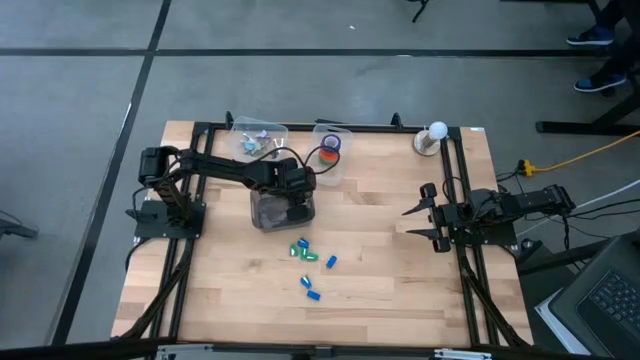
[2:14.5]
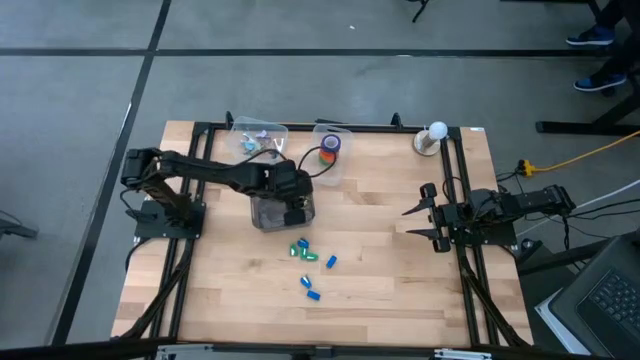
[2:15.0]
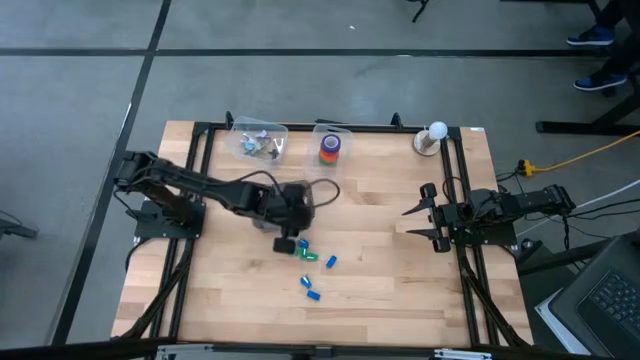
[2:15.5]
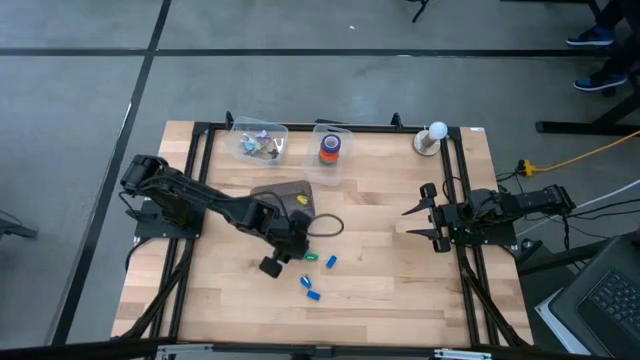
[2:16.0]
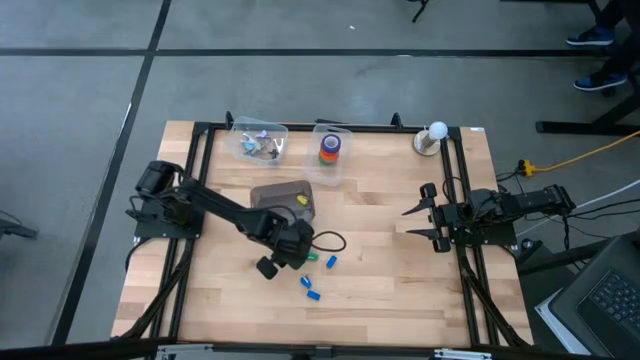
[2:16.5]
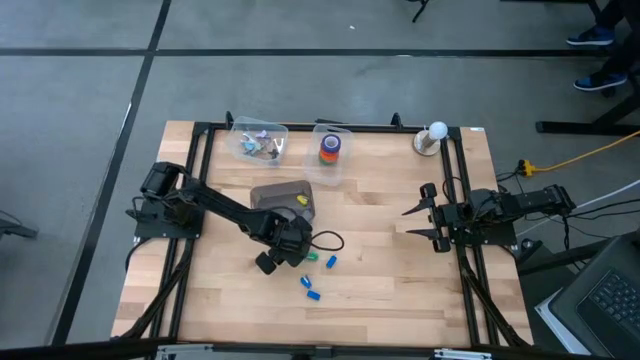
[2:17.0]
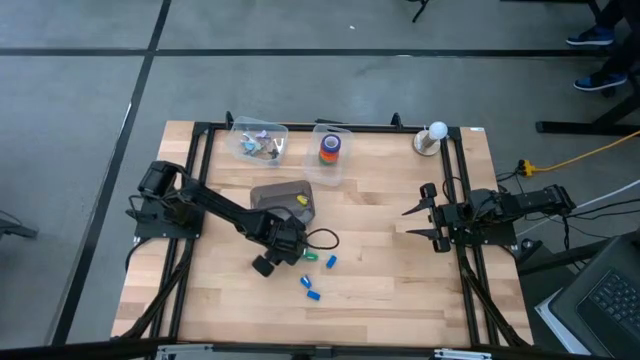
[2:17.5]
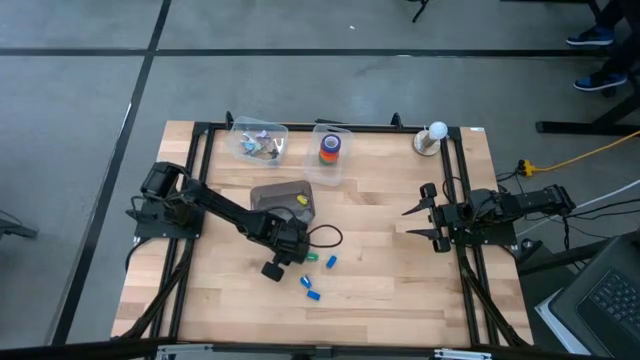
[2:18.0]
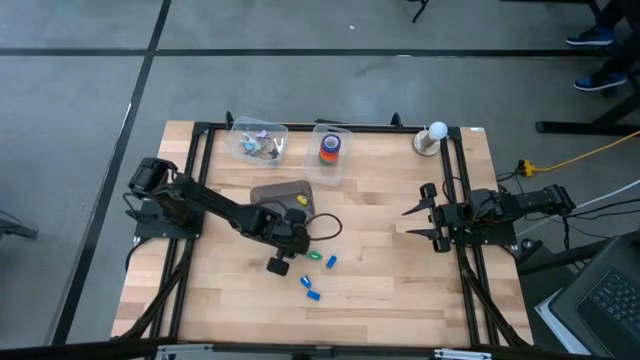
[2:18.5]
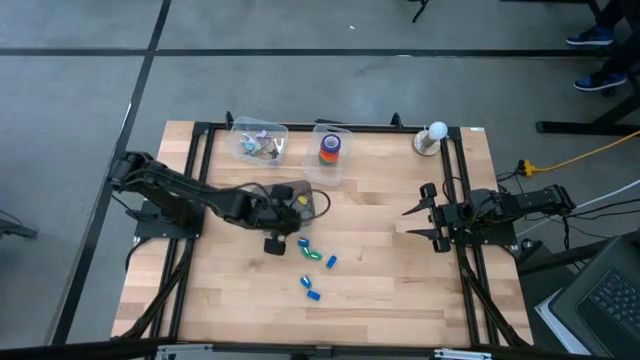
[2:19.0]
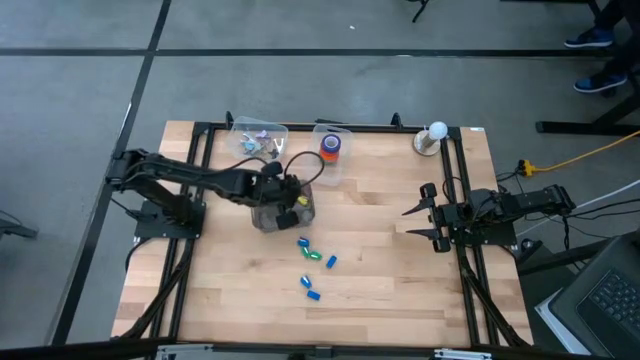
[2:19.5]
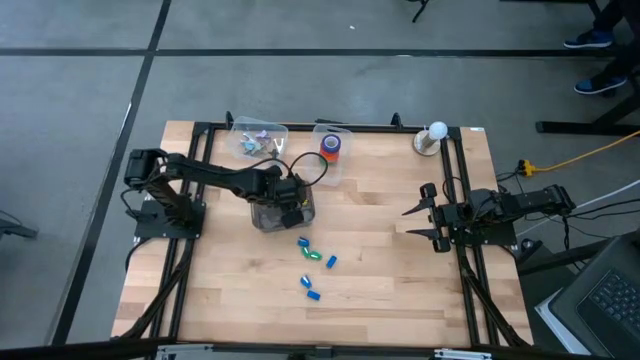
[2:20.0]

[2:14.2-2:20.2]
Task: Pick and place Stapler, Stapler remover, tape
Put the green stapler into the black bin

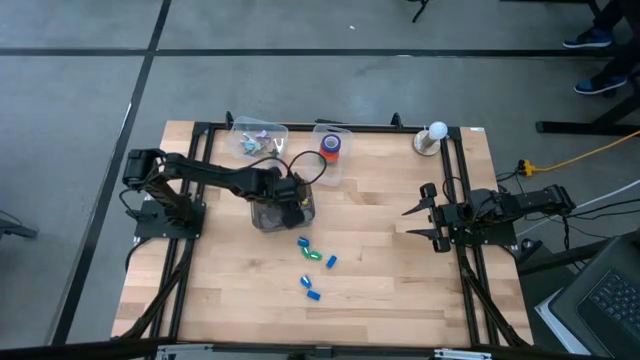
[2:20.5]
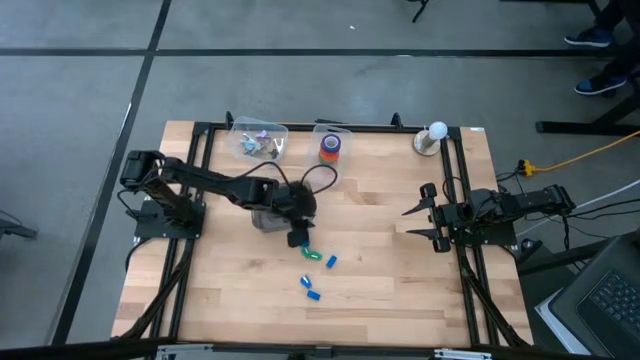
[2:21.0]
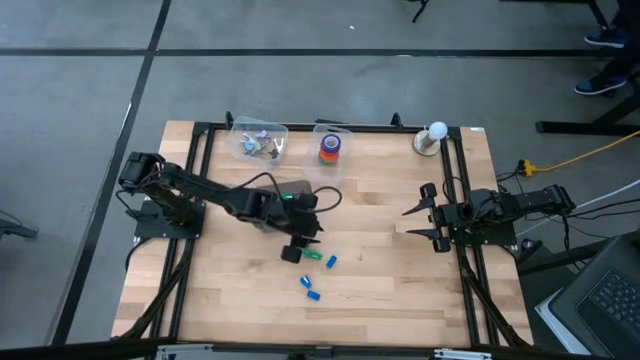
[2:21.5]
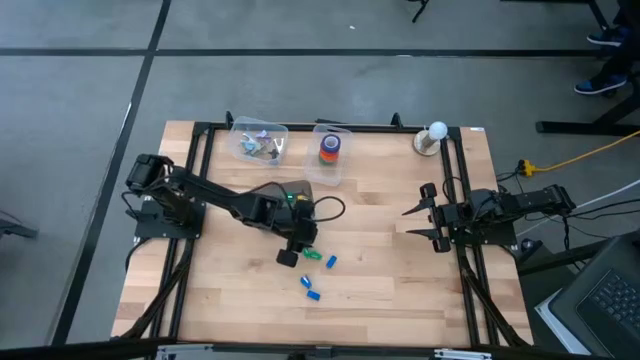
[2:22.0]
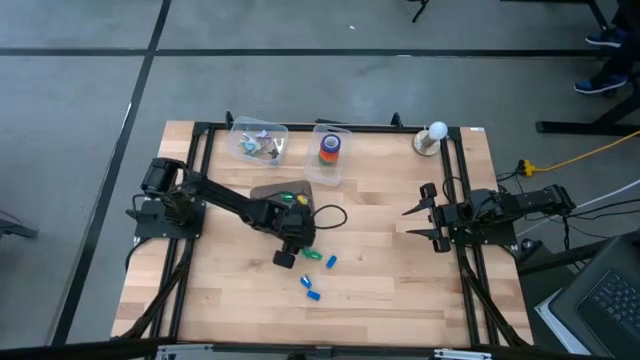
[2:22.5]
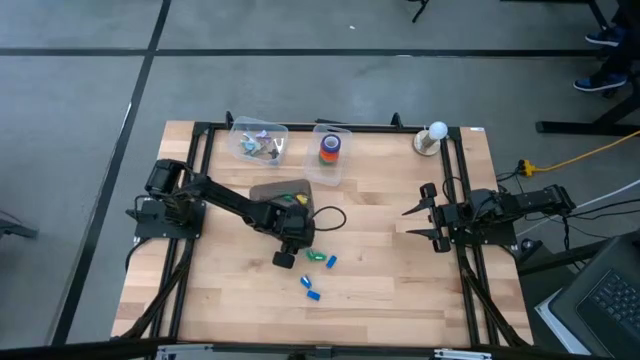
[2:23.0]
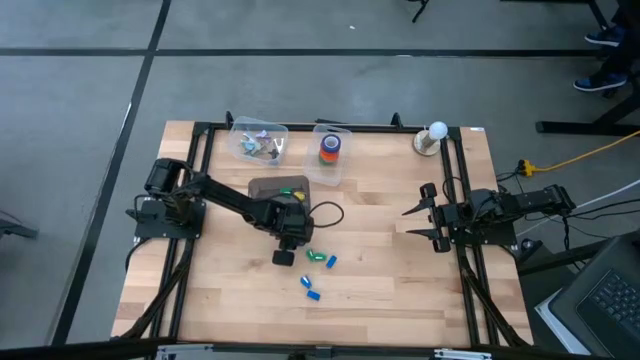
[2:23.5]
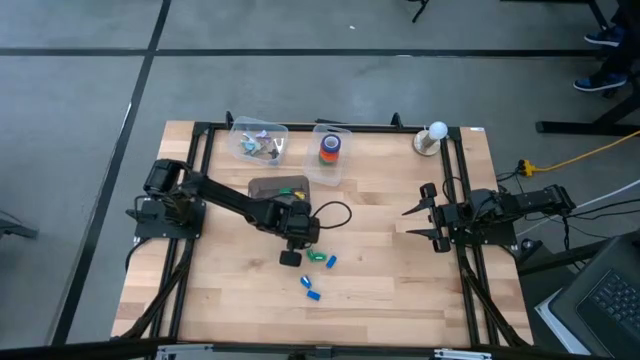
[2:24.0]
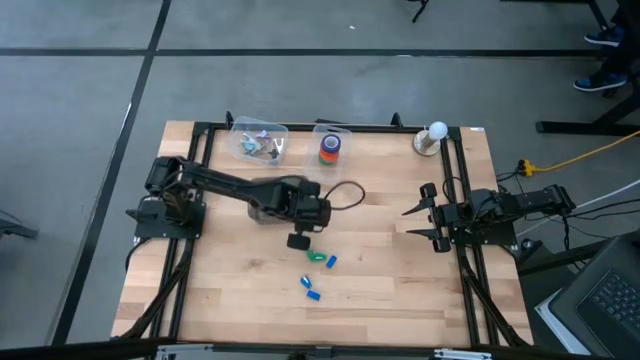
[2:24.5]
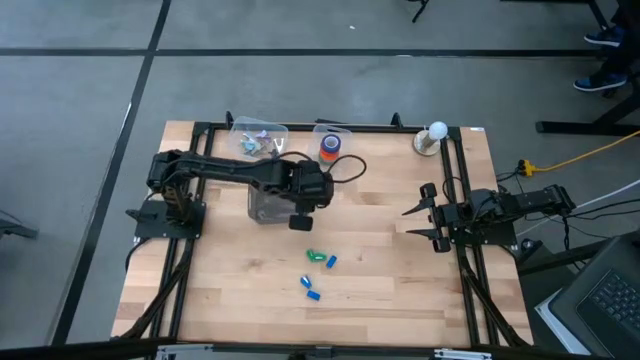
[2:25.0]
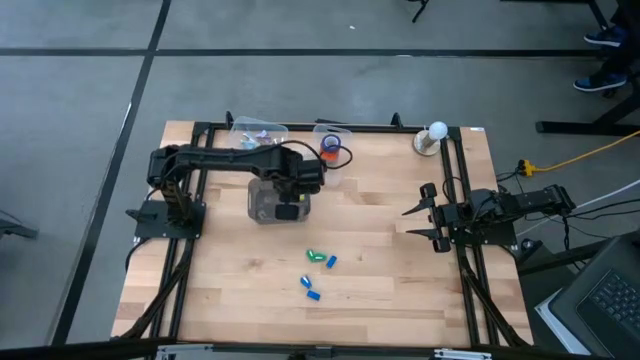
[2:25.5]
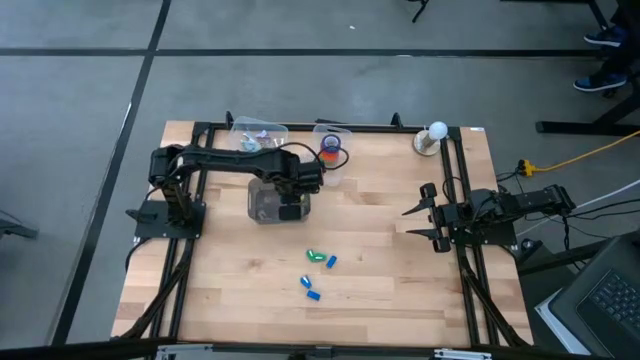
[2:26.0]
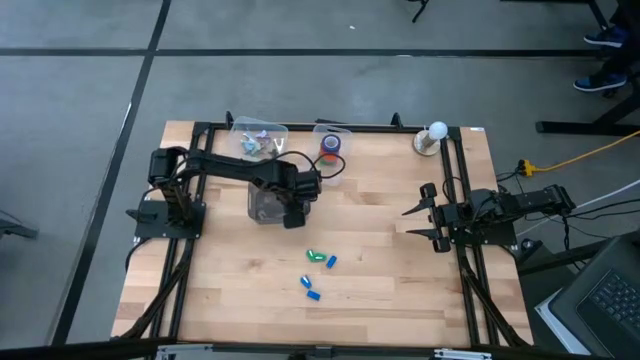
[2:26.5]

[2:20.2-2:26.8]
Put the blue stapler into the black bin

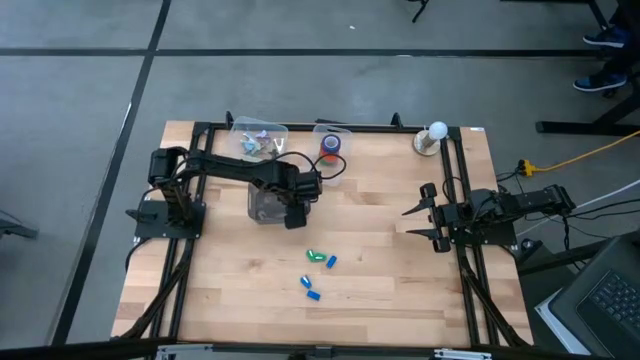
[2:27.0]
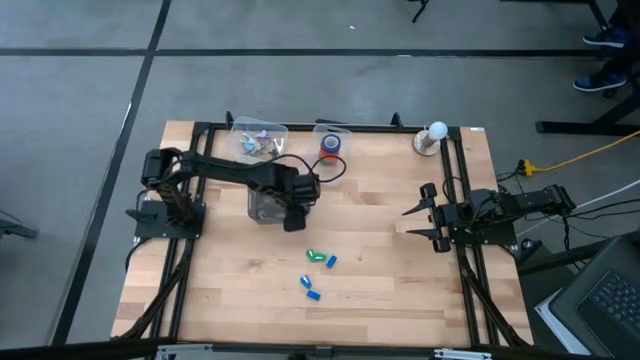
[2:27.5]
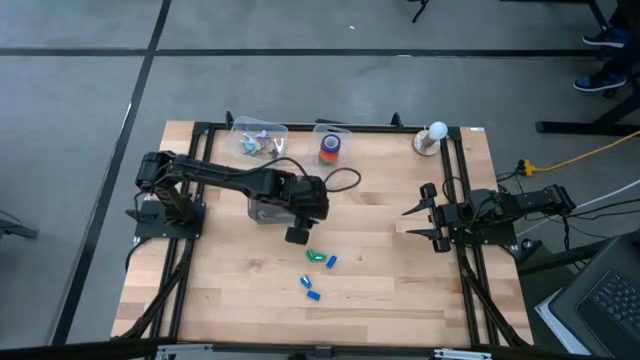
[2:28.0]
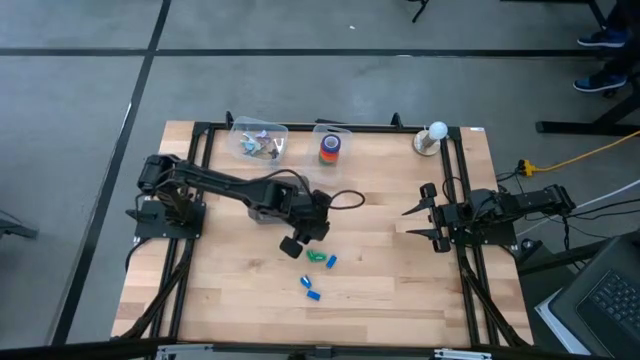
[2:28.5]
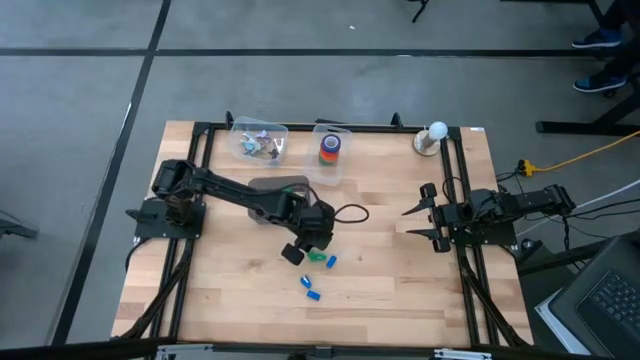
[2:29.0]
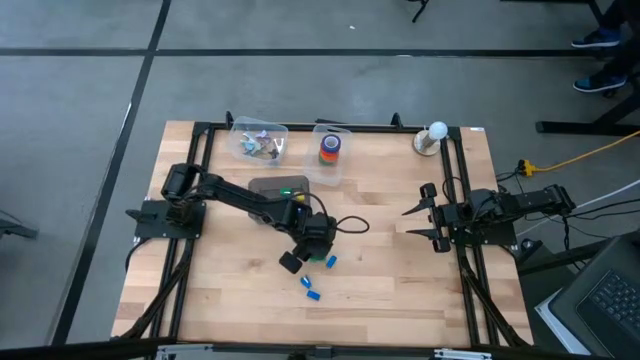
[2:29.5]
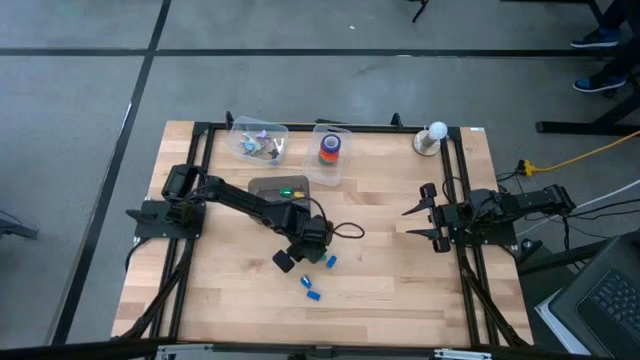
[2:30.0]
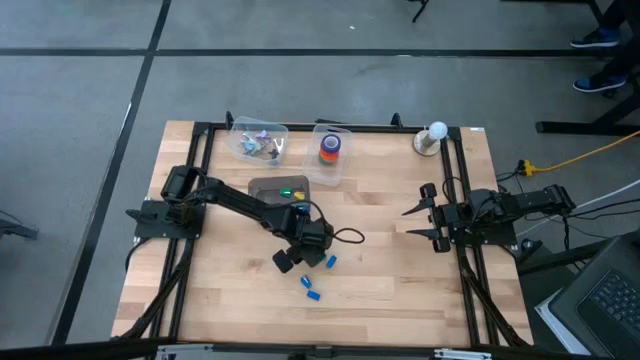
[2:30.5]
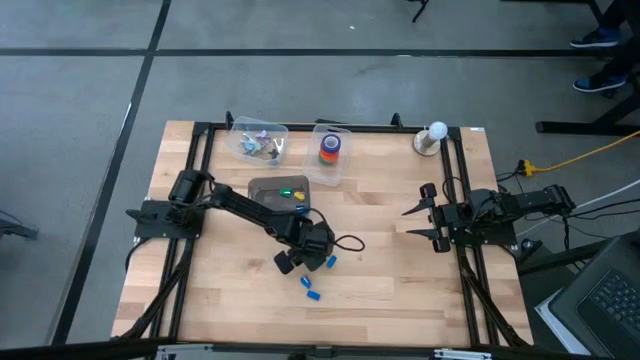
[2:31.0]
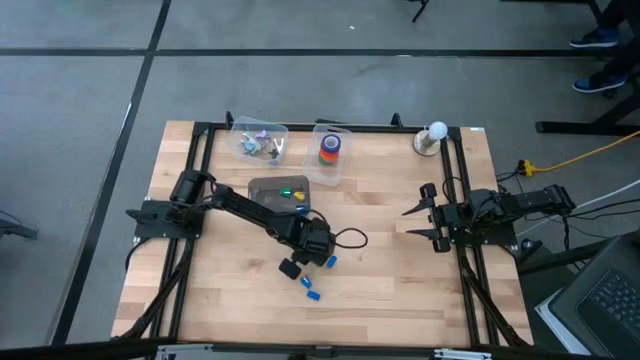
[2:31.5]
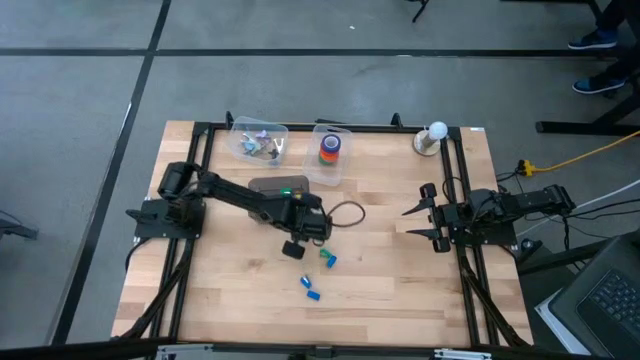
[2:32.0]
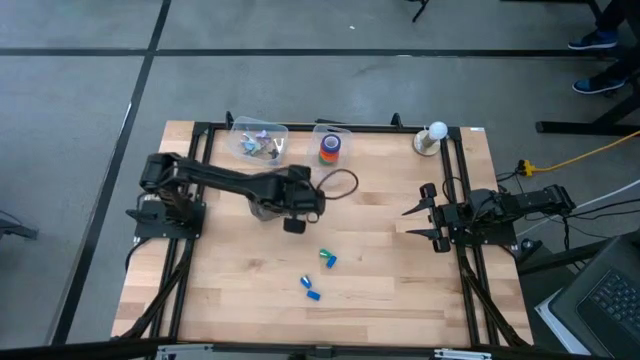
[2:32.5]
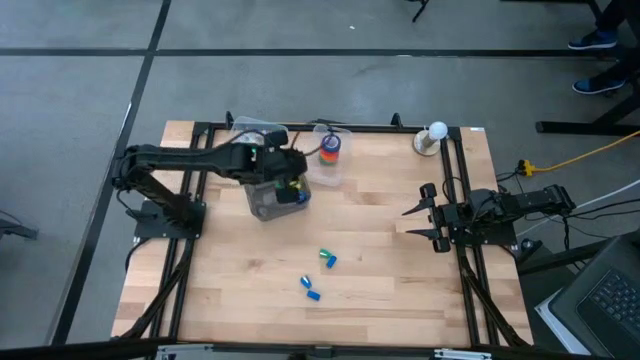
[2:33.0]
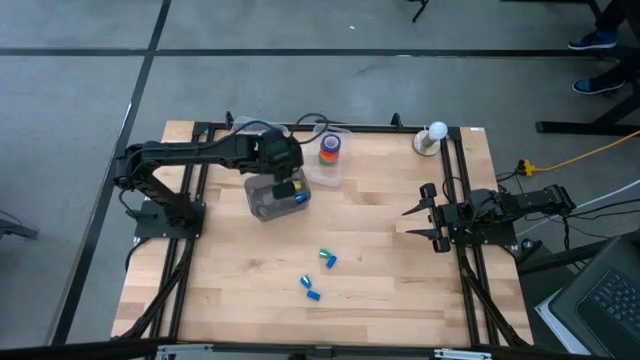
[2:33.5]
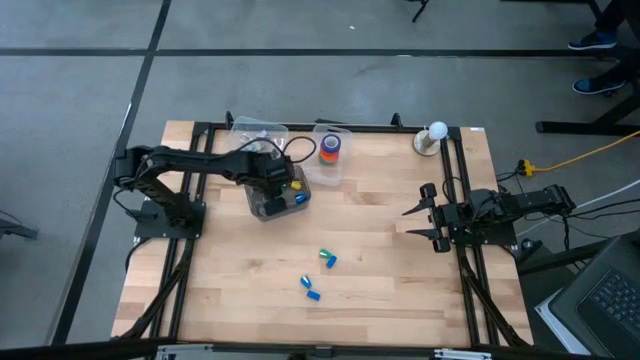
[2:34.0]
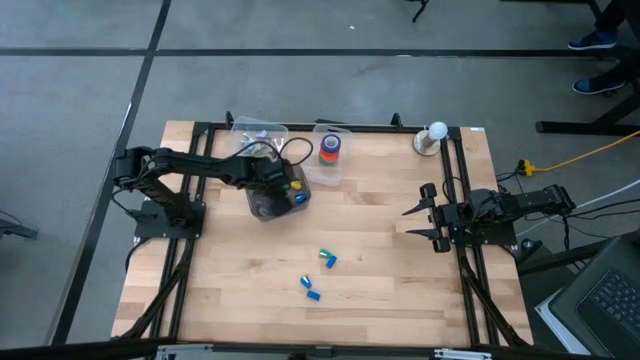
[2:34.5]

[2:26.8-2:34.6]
Put the green stapler into the black bin

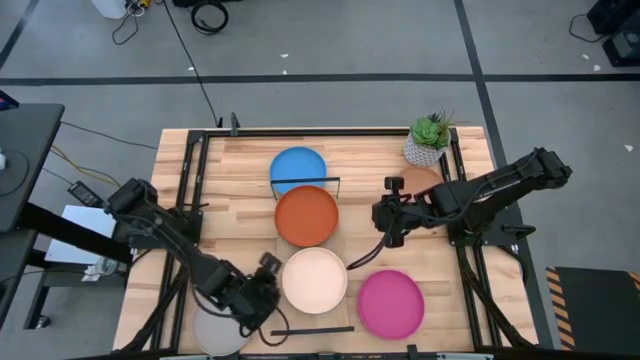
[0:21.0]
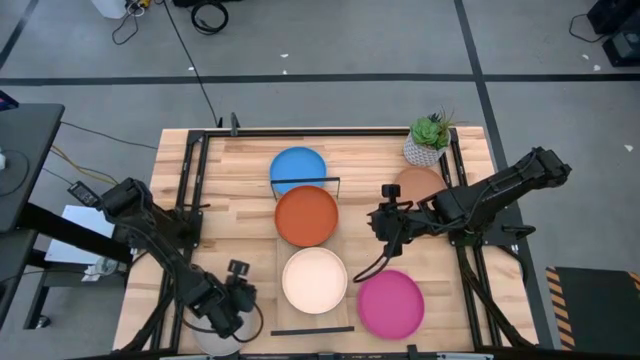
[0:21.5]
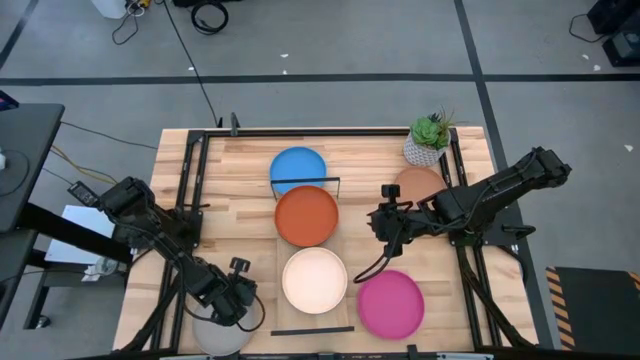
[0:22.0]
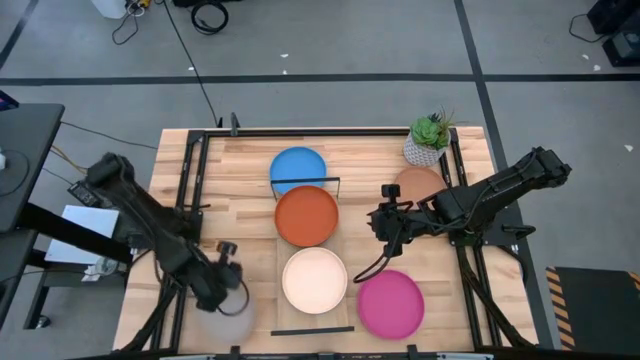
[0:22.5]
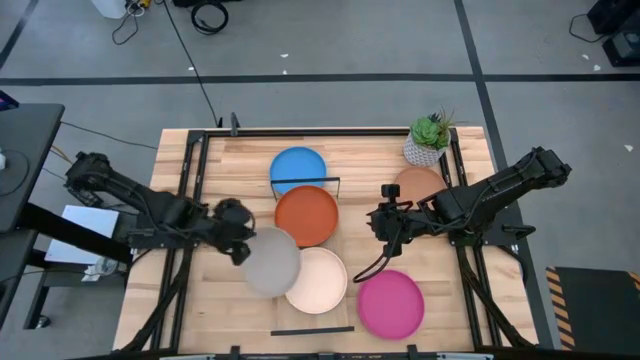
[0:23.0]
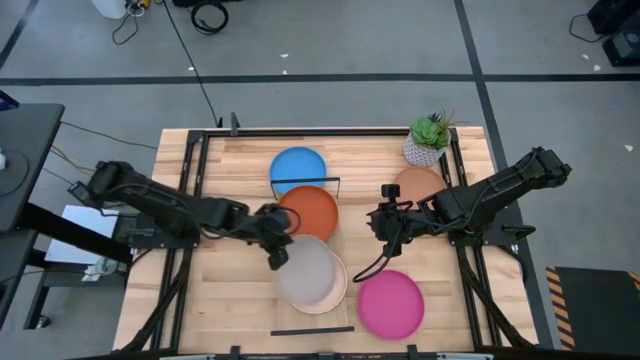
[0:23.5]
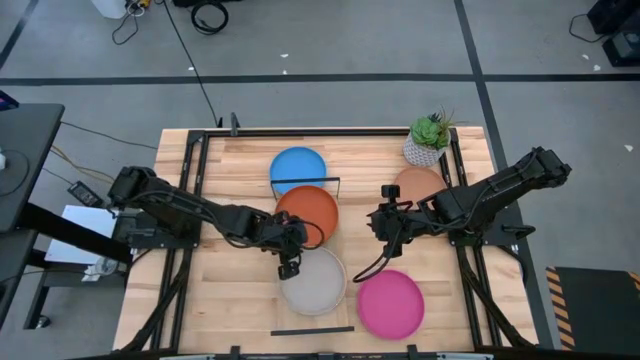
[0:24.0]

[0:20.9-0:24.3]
Task: Place and stack plates onto a shelf
Stack the gray plate on top of the light orange plate on the shelf
